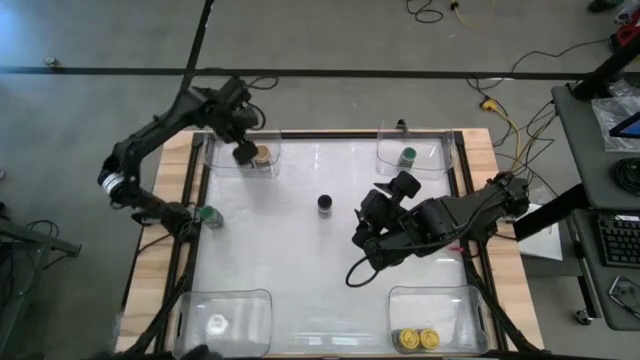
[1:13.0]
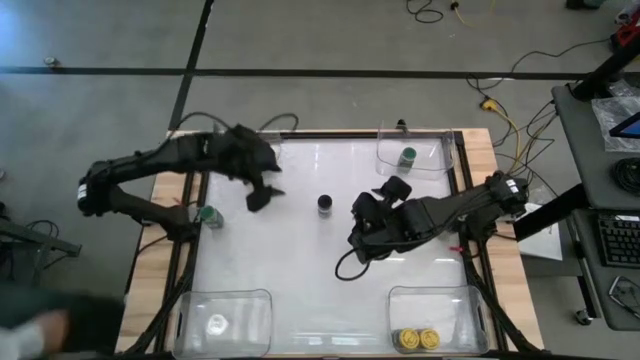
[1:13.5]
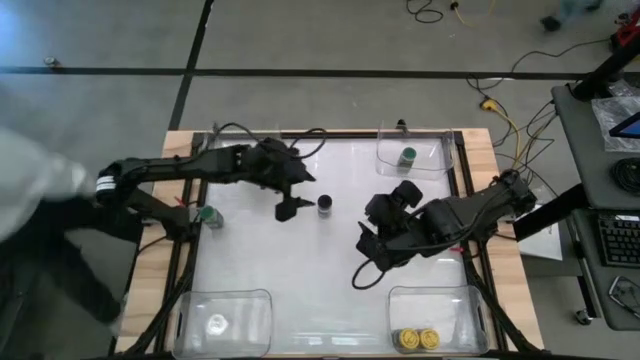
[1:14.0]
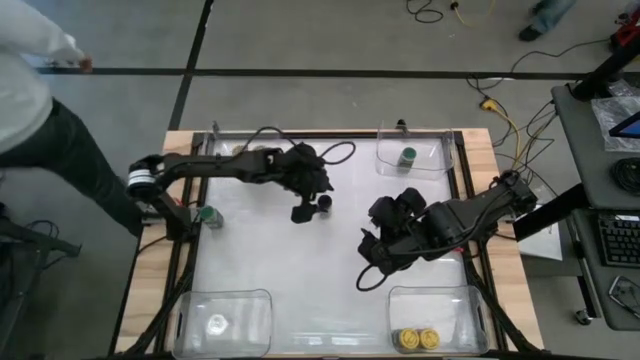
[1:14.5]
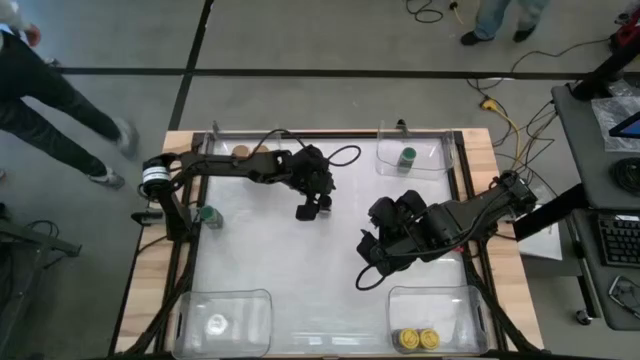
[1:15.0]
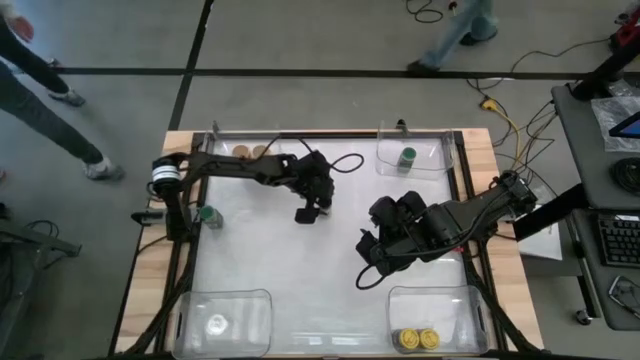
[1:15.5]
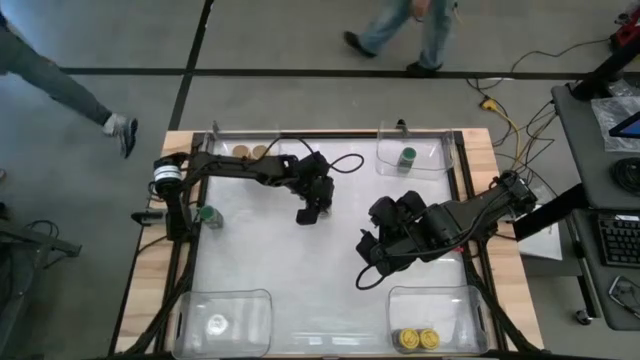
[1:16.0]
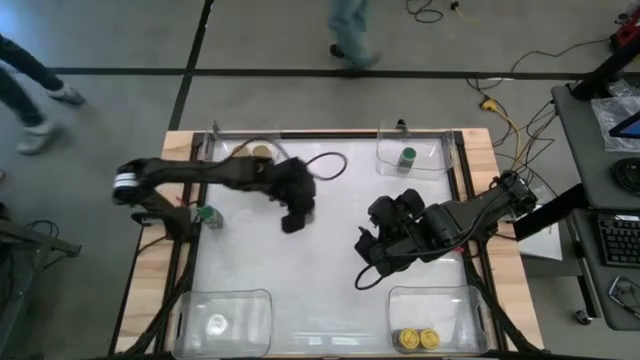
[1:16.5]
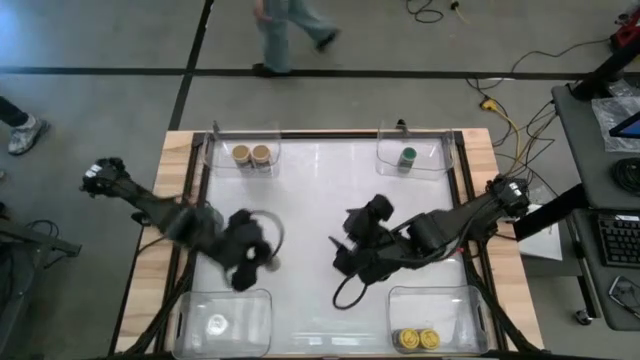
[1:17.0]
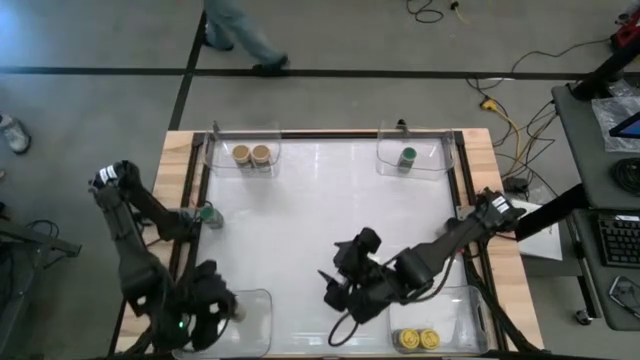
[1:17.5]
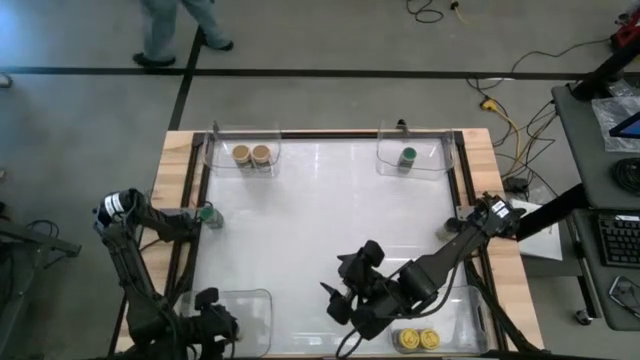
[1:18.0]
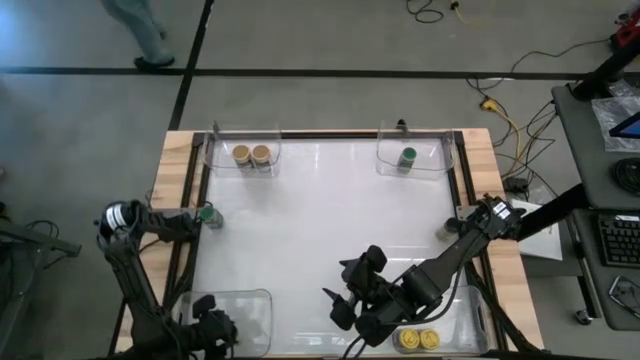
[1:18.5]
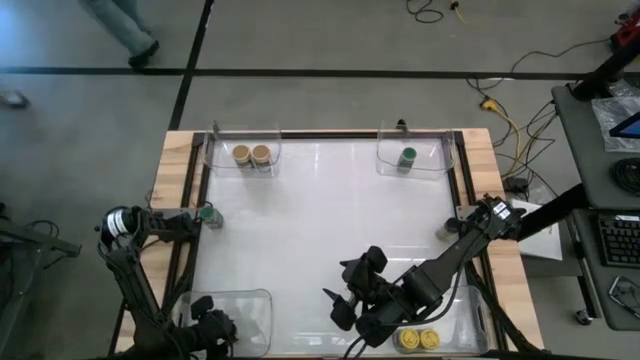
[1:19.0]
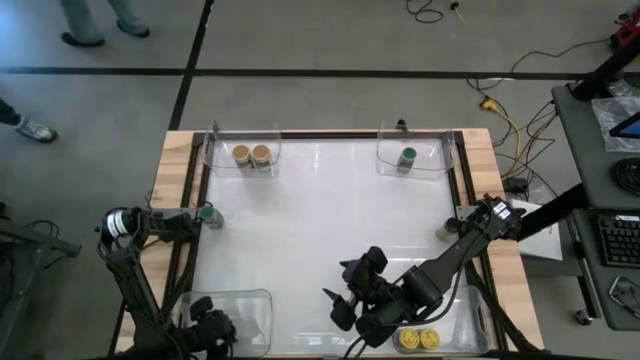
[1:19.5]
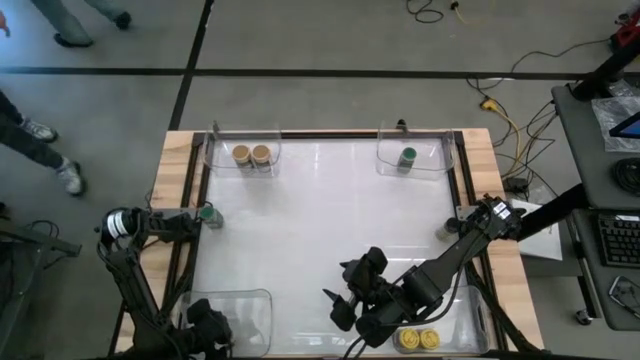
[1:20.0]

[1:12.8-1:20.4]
Task: Sort spices by type
Put the left black seasoning bottle into the bottom left transparent bin

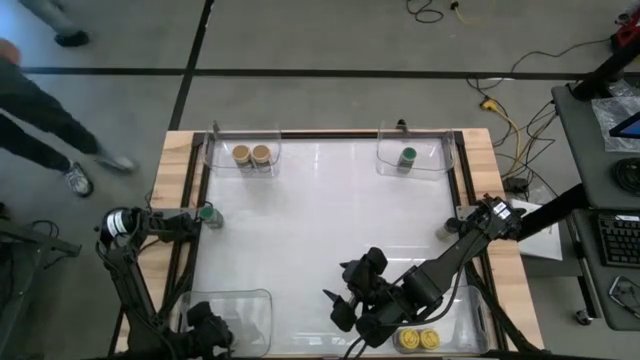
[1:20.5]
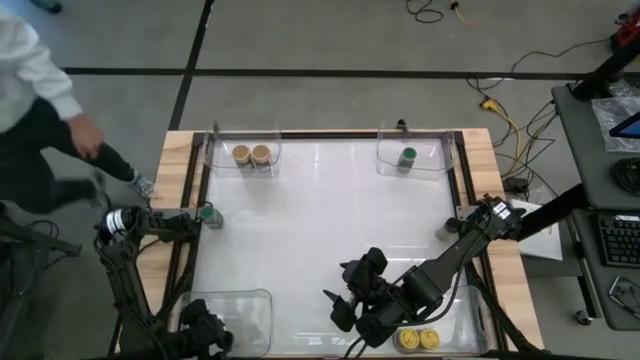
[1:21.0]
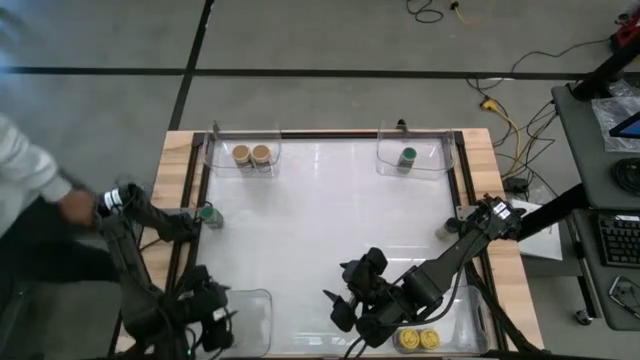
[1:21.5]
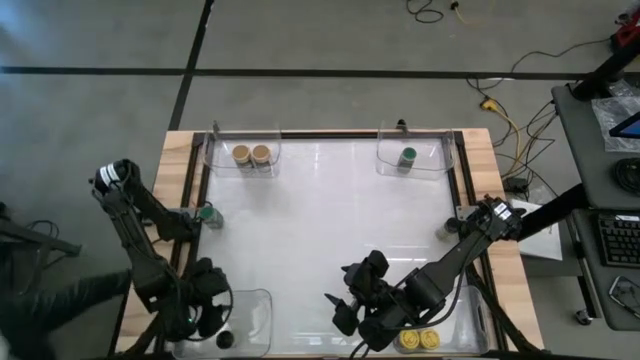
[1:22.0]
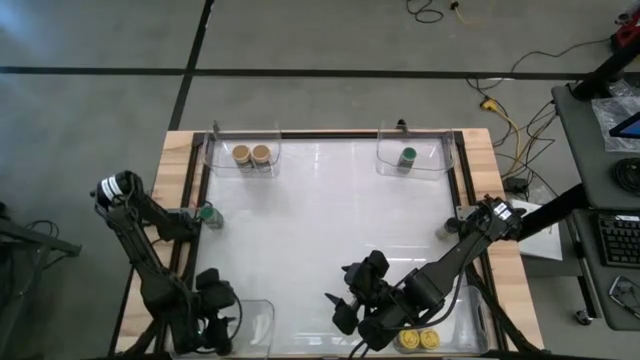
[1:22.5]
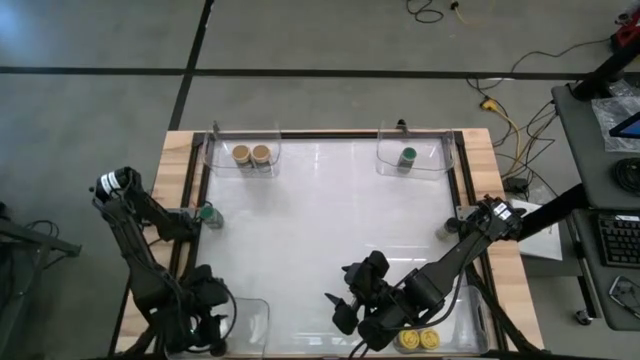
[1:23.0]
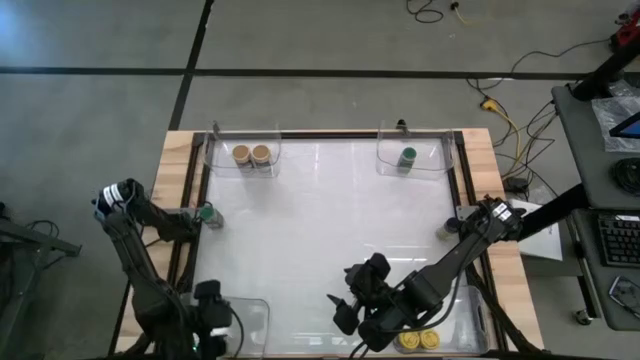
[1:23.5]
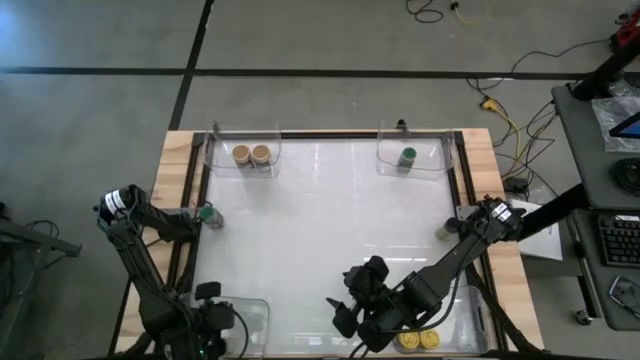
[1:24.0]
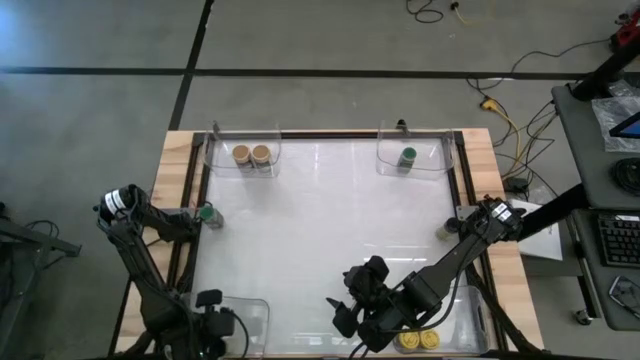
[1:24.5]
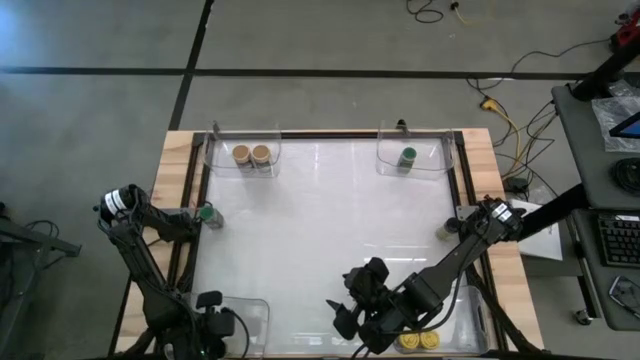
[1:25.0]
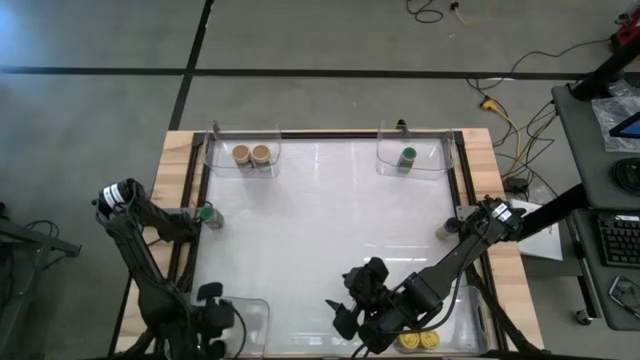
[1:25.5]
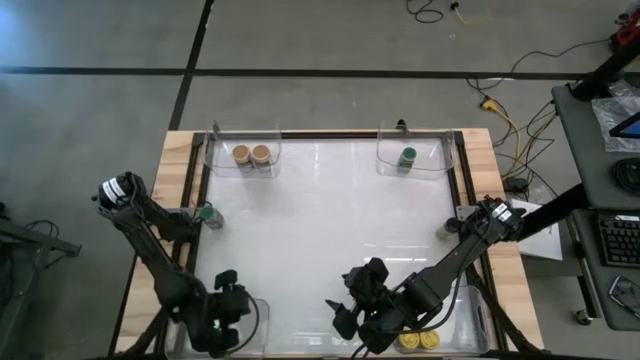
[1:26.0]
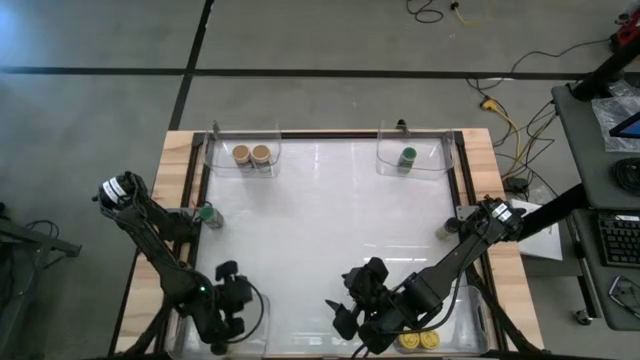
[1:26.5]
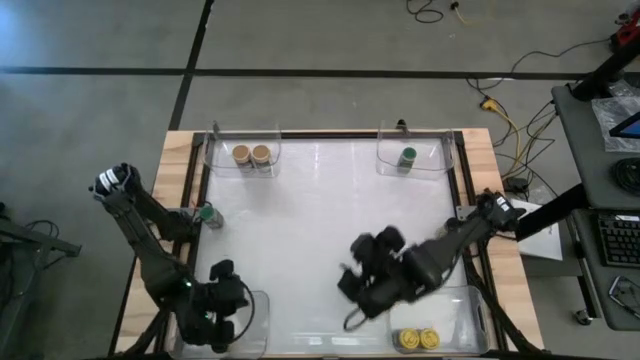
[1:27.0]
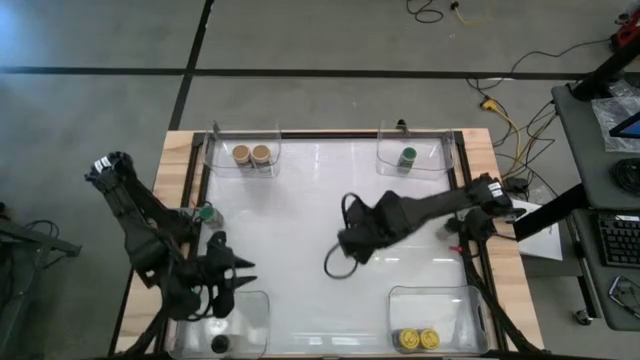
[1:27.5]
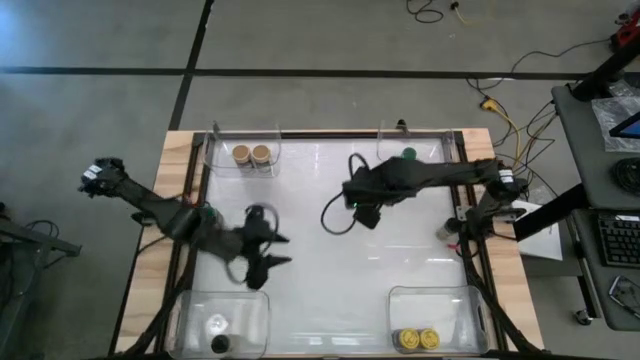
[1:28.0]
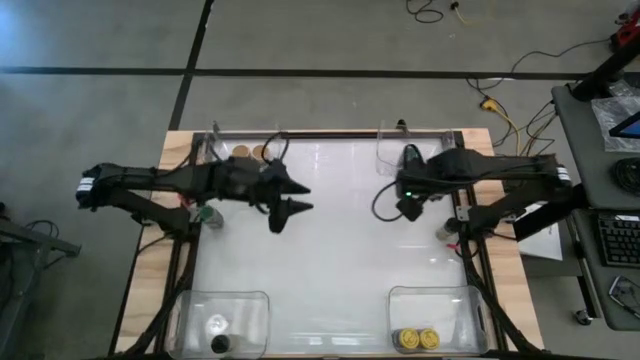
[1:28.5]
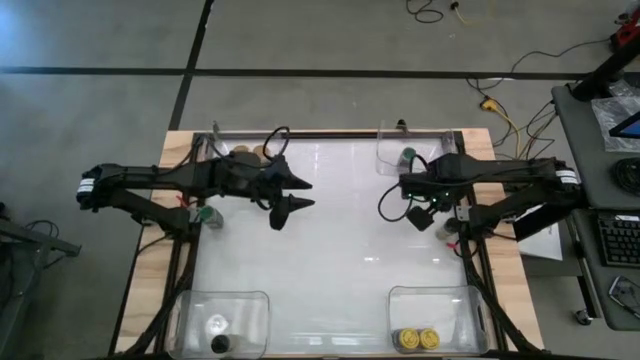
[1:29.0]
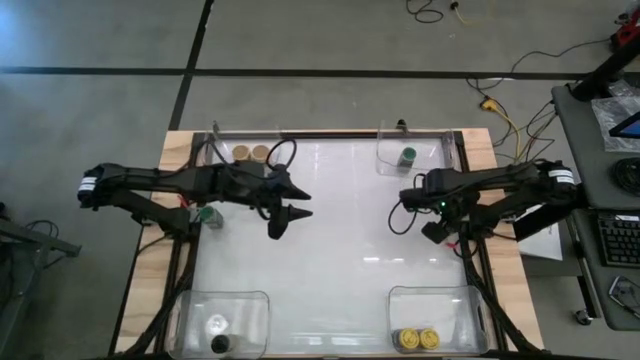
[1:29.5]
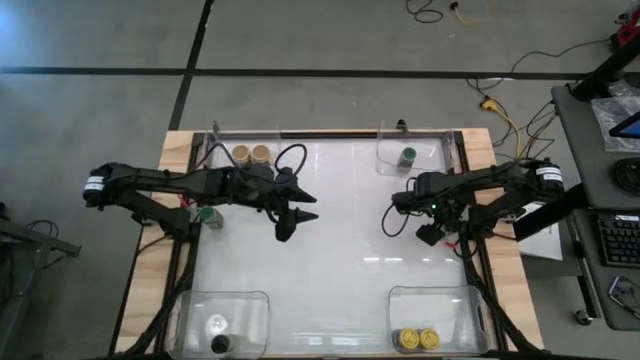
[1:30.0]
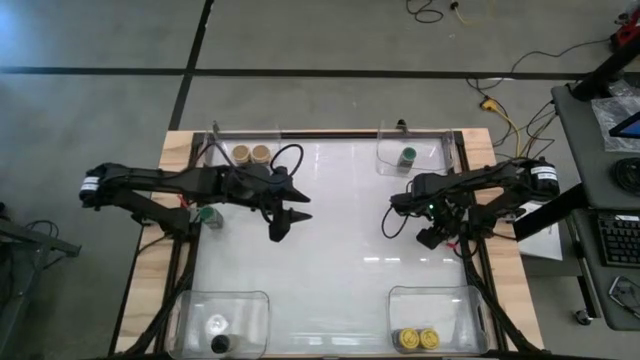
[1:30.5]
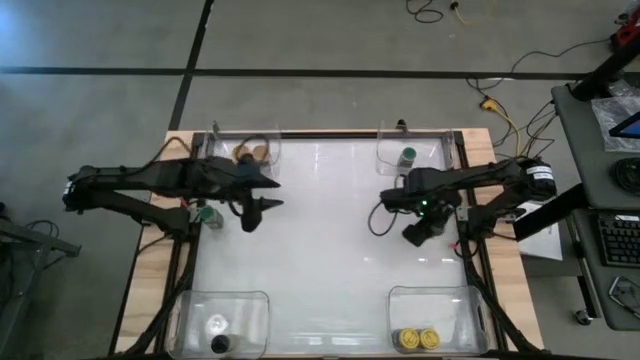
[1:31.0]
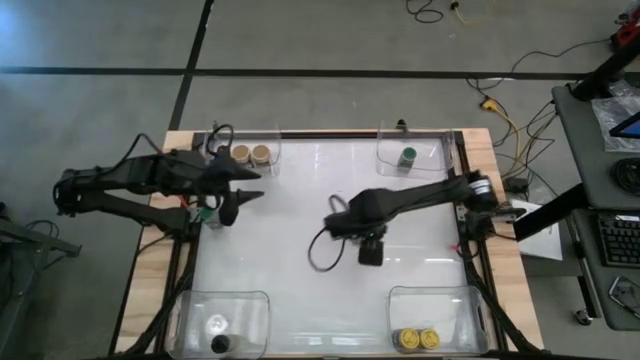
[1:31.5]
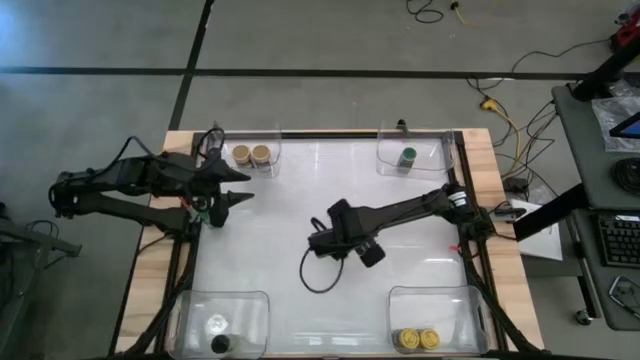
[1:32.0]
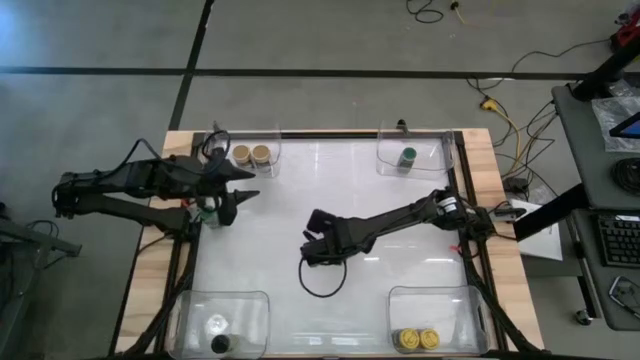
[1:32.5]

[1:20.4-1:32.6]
Put the black seasoning bottle into the bottom left transparent bin

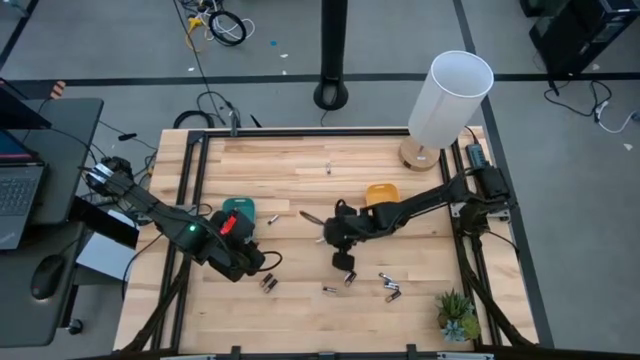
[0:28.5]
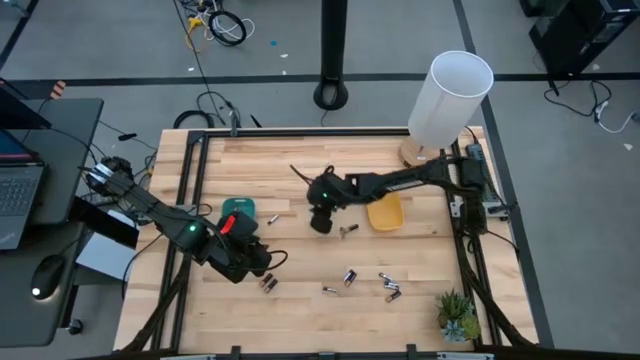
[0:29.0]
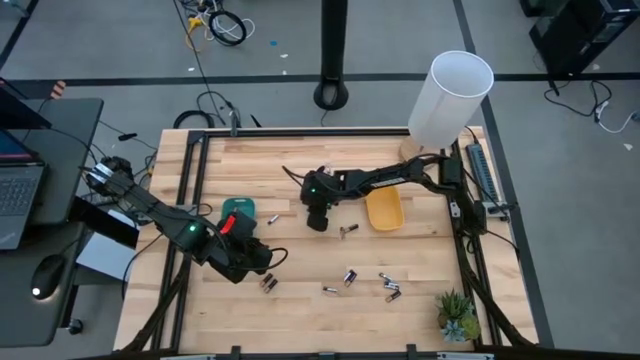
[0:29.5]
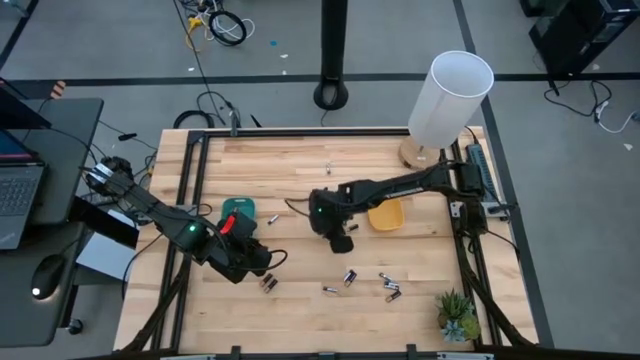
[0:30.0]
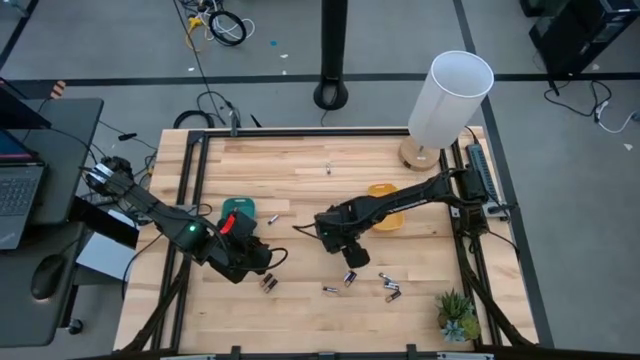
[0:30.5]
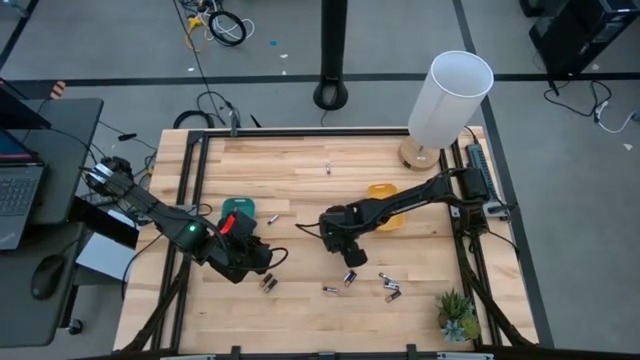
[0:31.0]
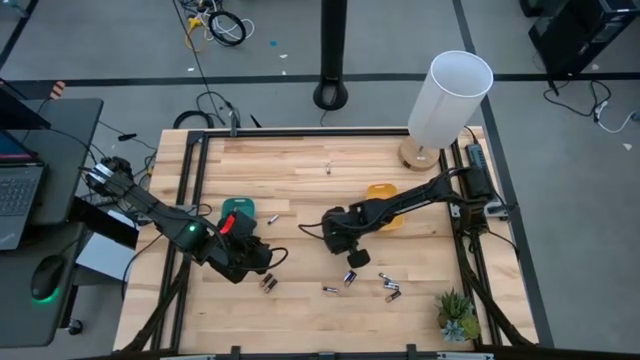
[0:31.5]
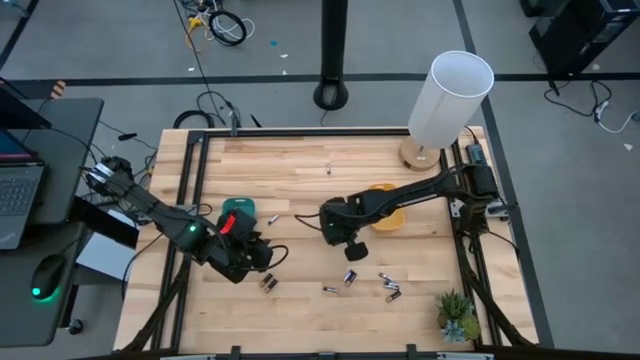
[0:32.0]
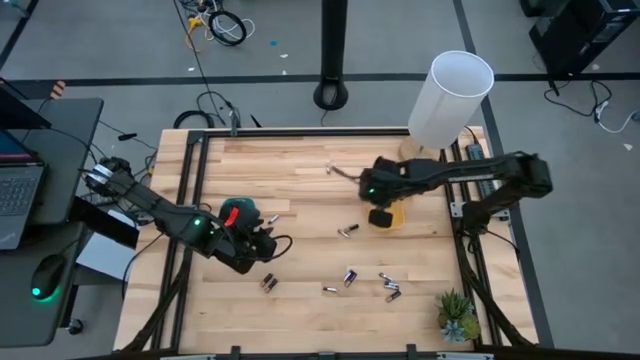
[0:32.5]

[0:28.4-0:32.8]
Task: Sort batteries
Put the silver battery into the yellow bin
